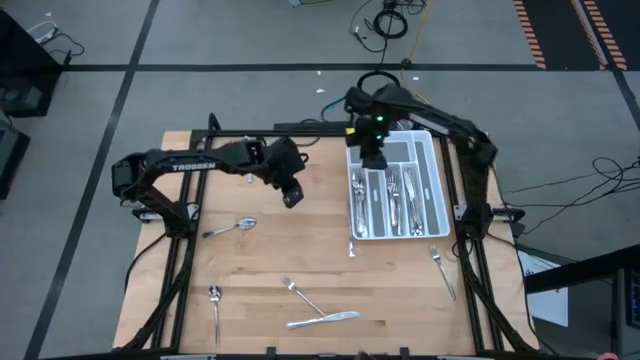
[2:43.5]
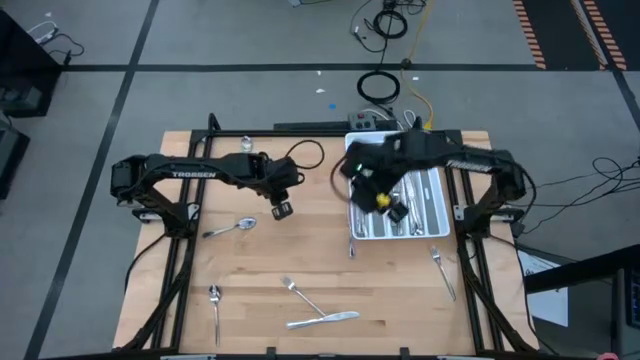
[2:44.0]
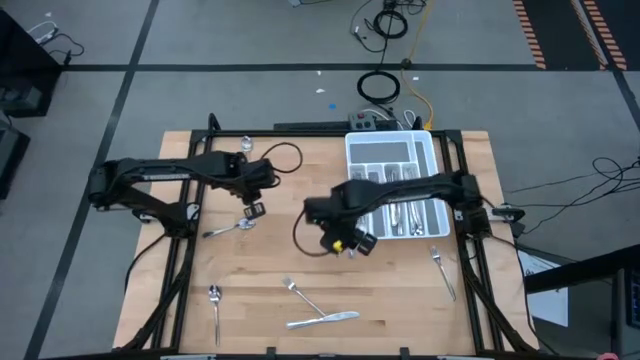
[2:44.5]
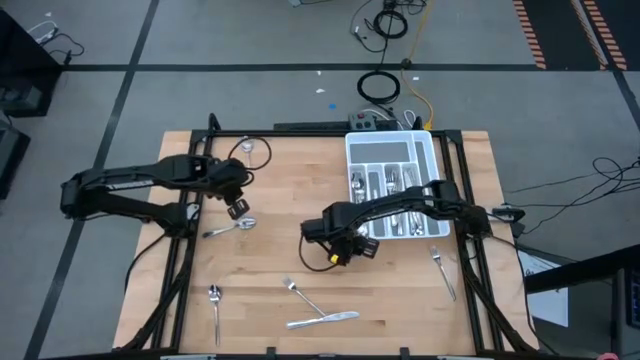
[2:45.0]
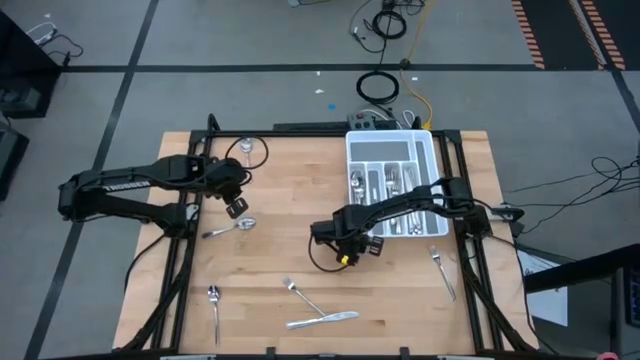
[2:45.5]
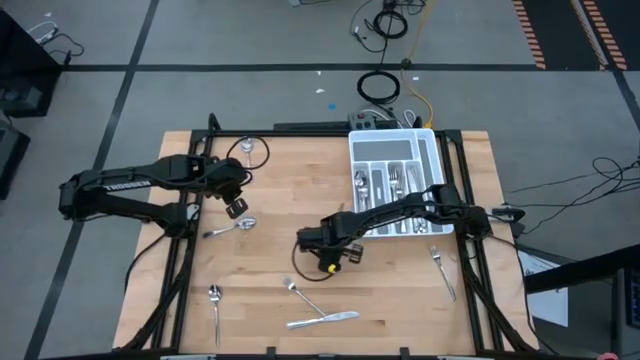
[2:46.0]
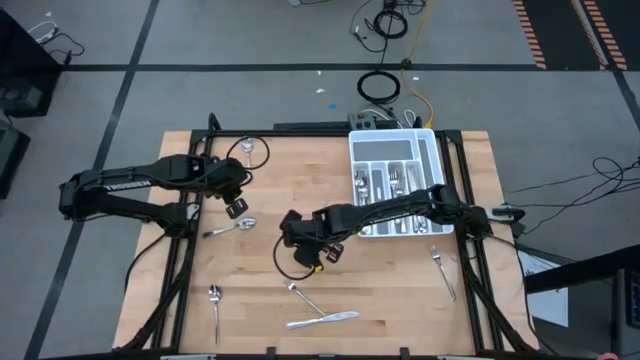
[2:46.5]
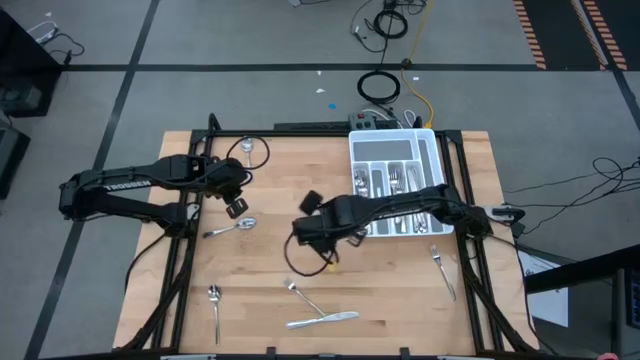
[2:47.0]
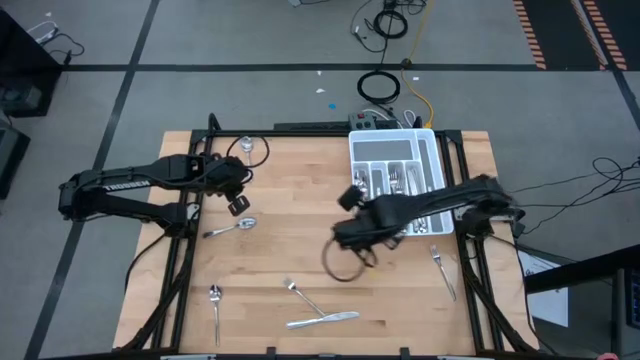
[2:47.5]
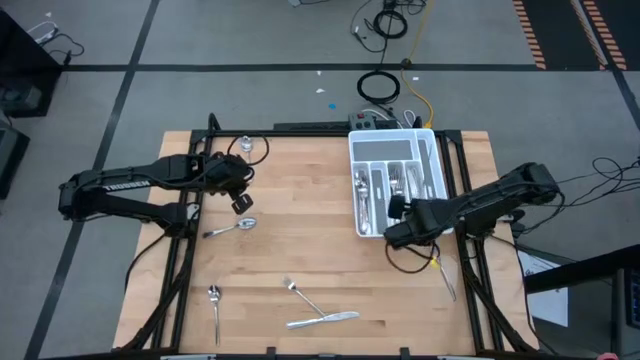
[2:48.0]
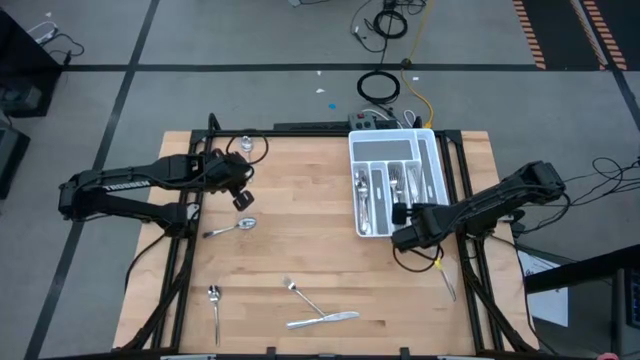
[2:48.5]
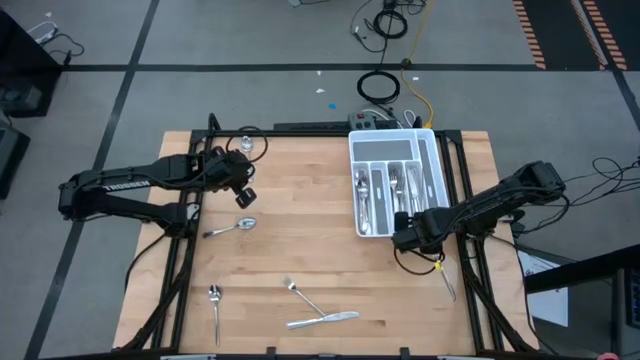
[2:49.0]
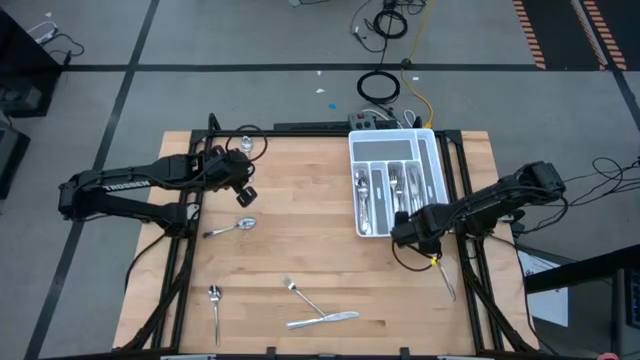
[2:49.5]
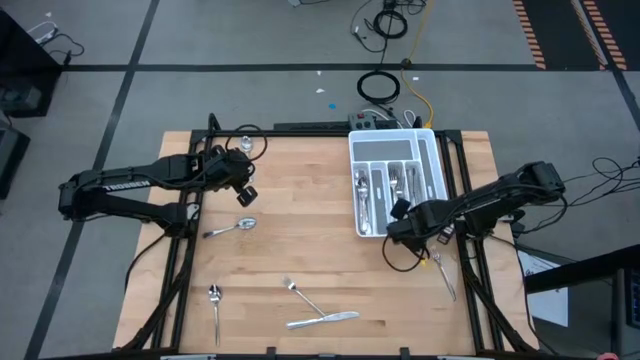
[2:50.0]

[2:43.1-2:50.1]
Task: Sort silverware
Put the silver knife into the white silverware tray

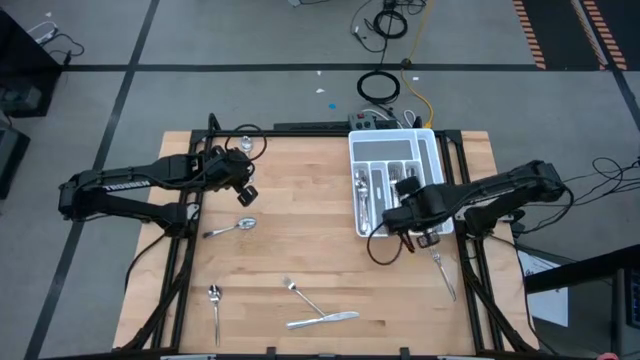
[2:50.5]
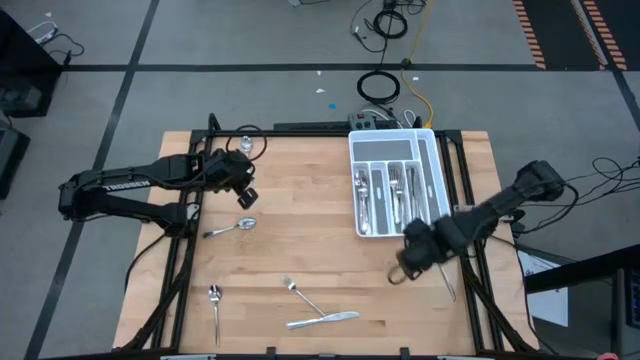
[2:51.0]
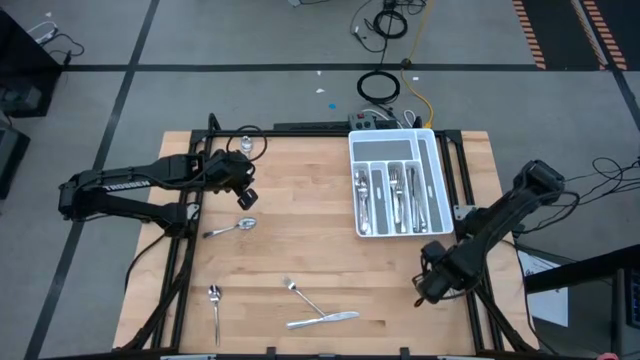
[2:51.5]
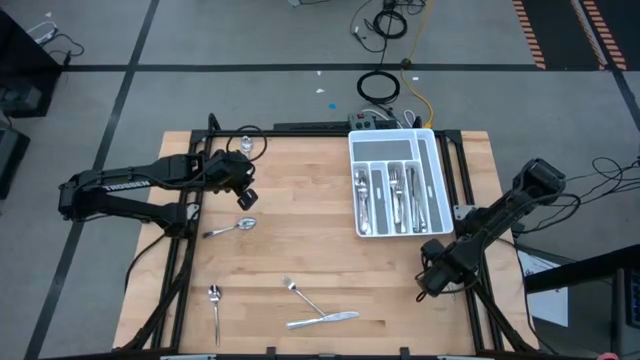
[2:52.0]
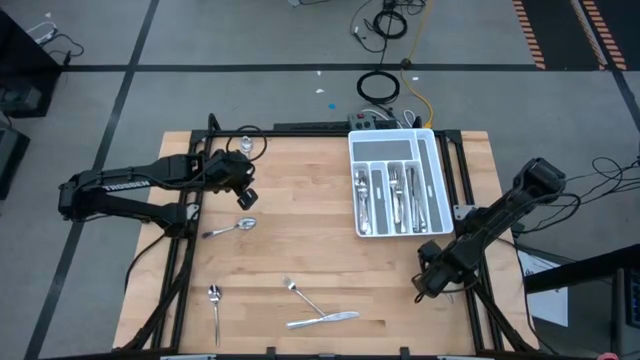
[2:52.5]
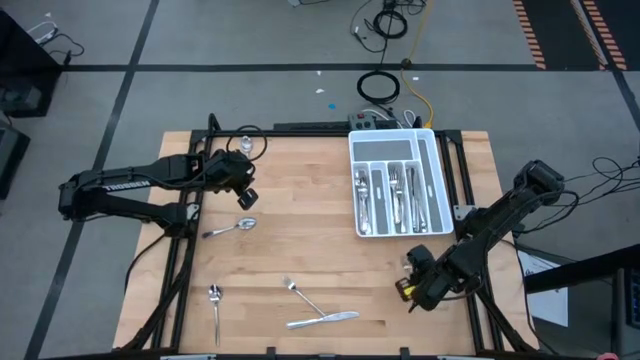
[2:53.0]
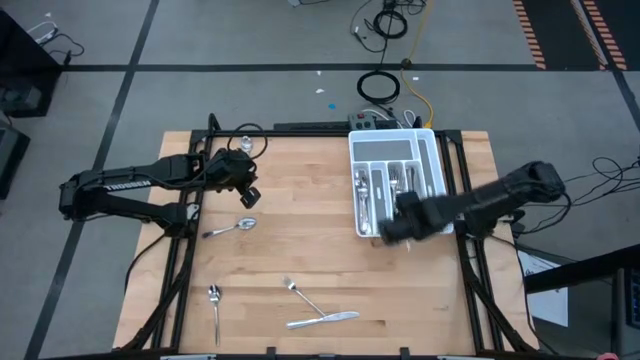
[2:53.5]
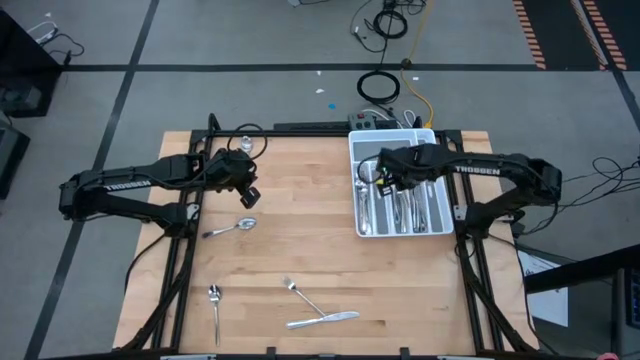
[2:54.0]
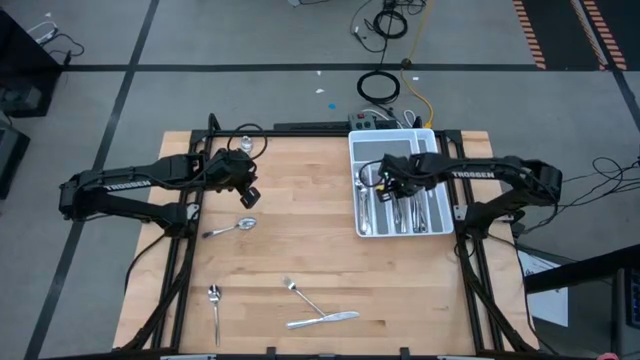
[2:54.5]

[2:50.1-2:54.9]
Put the silver fork into the white silverware tray

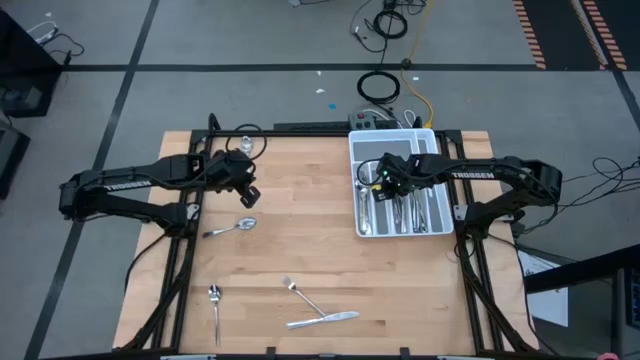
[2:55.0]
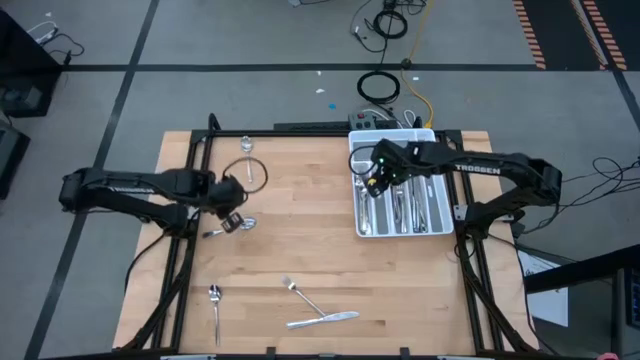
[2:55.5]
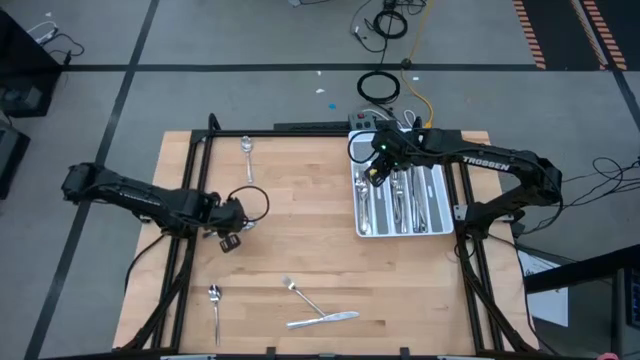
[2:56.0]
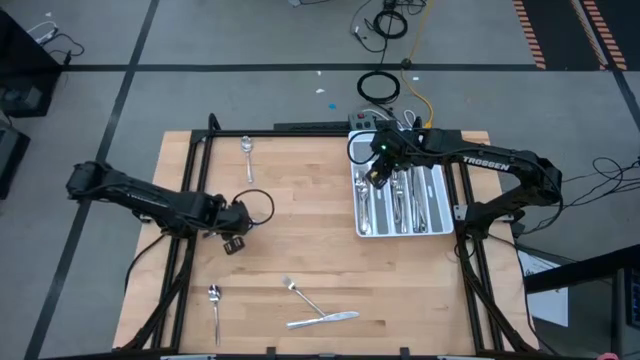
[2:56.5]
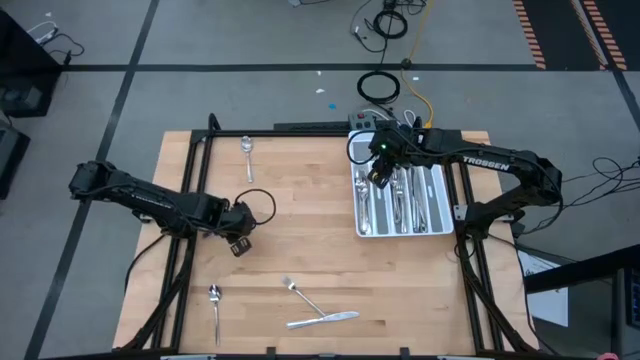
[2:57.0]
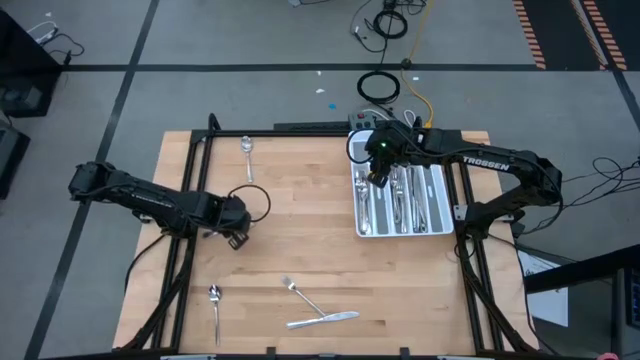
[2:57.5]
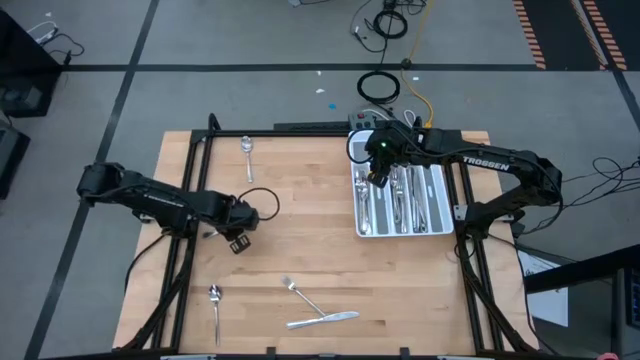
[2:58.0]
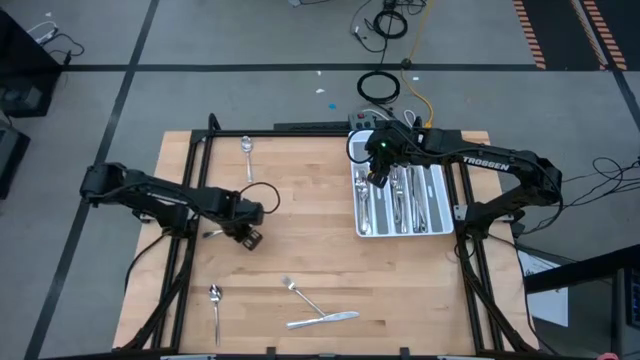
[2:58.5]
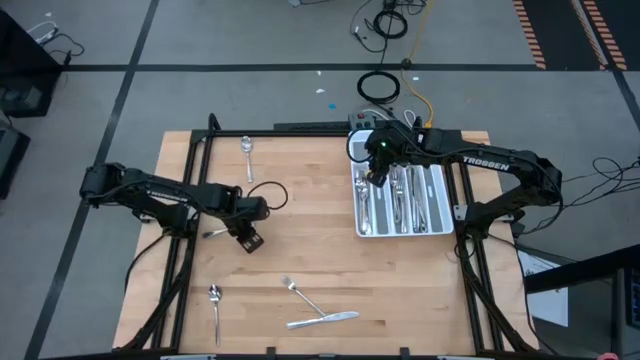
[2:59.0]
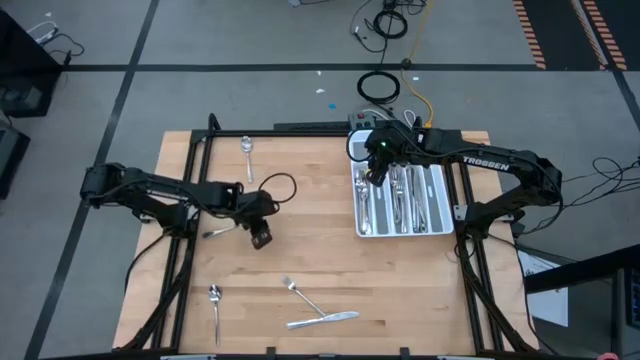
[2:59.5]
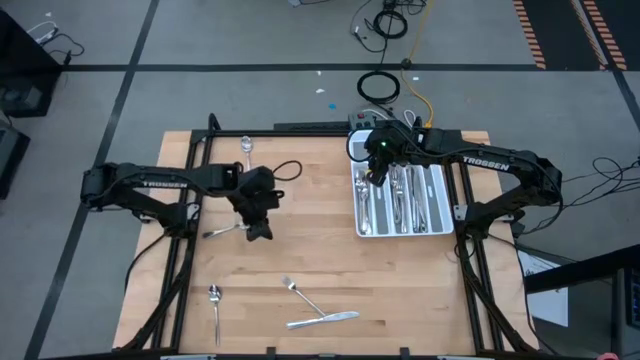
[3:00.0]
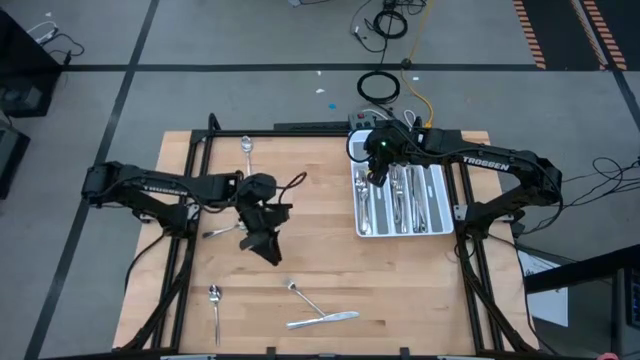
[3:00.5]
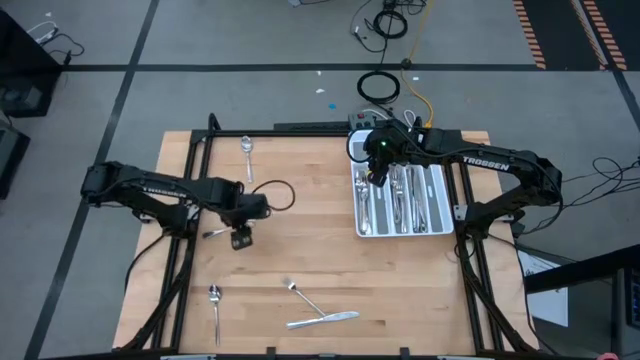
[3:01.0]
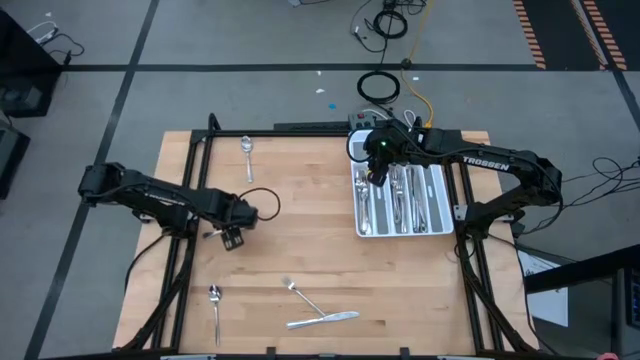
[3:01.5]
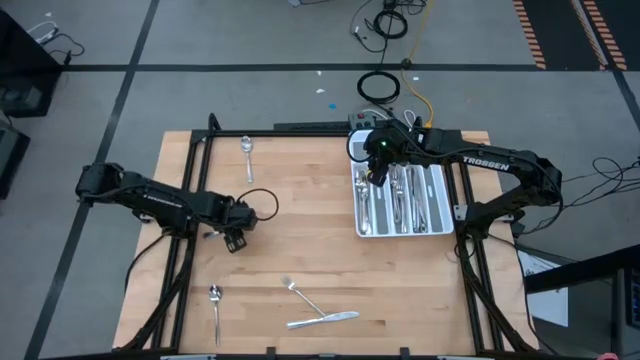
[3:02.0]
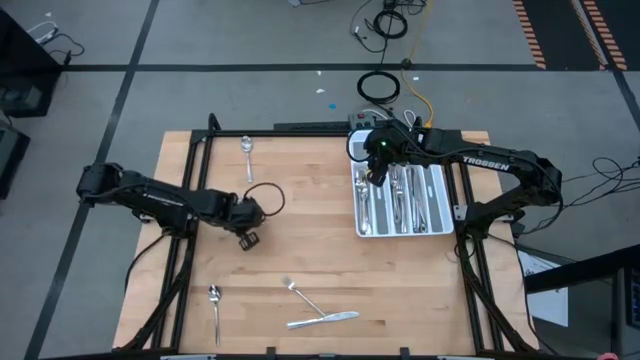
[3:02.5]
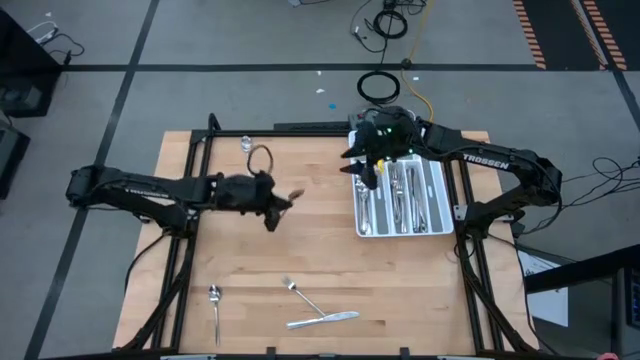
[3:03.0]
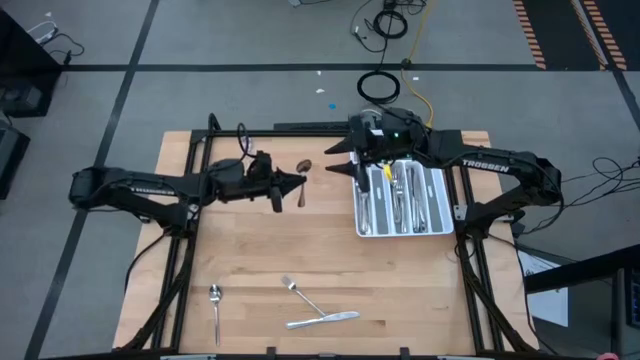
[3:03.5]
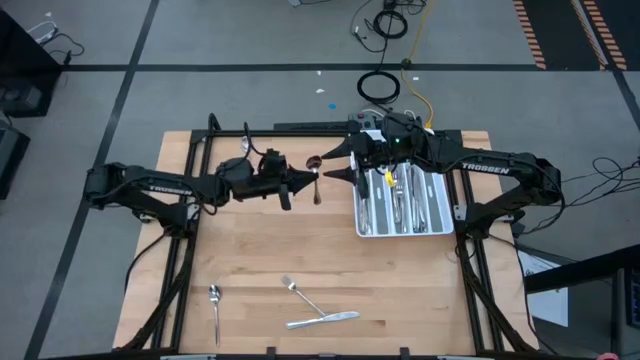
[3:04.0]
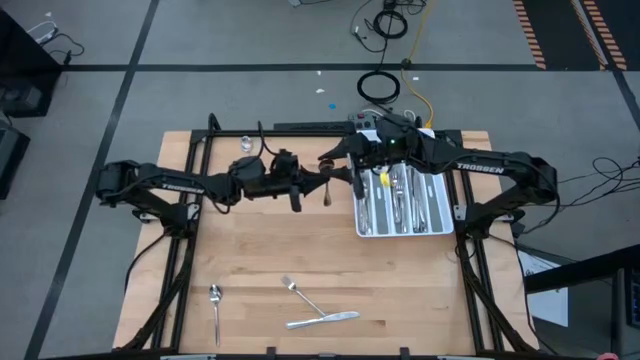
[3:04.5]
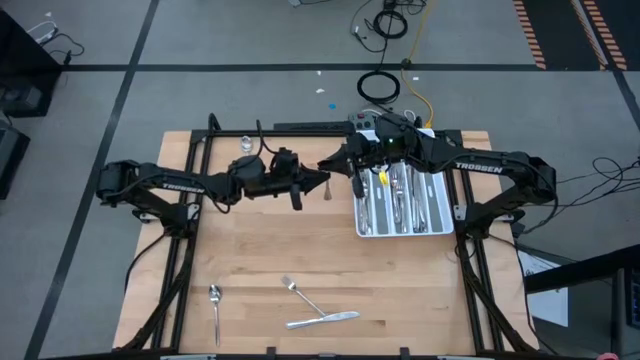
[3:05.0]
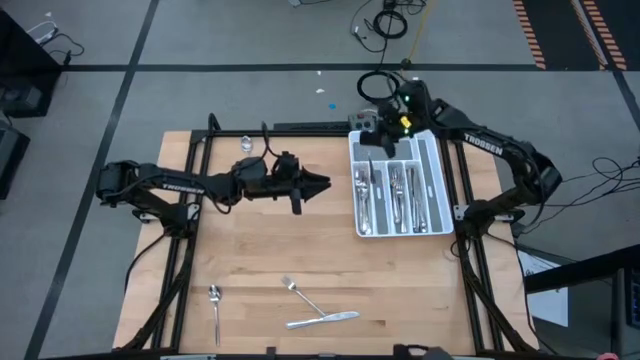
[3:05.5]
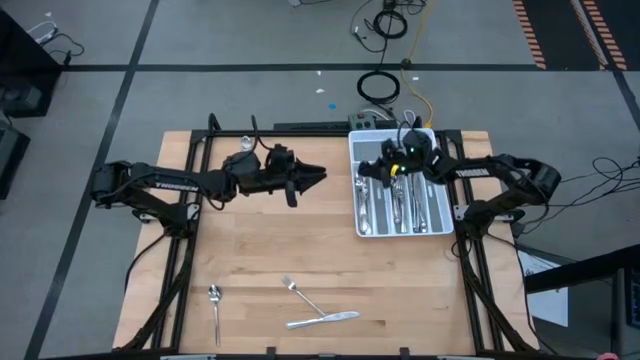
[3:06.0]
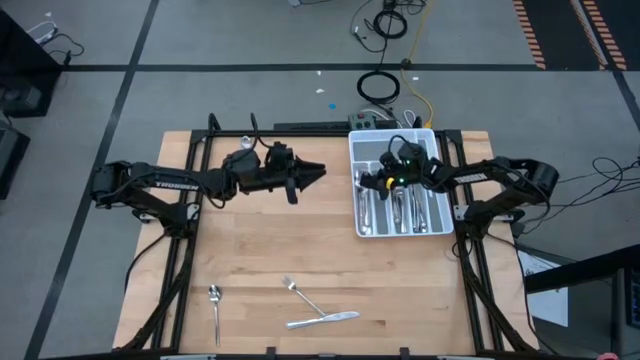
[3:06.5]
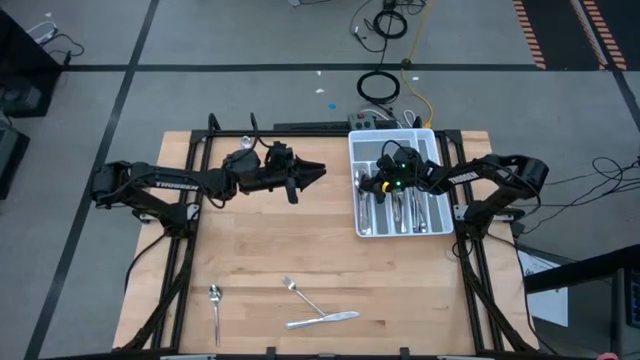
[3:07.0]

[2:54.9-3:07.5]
Put the silver spoon into the white silverware tray
